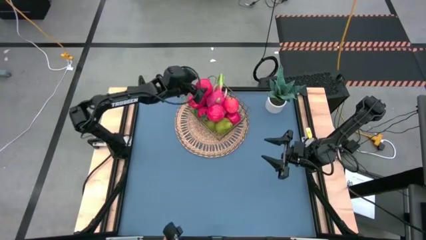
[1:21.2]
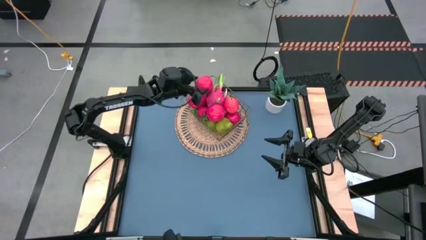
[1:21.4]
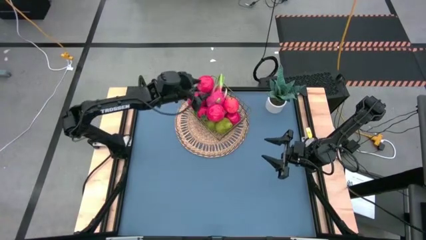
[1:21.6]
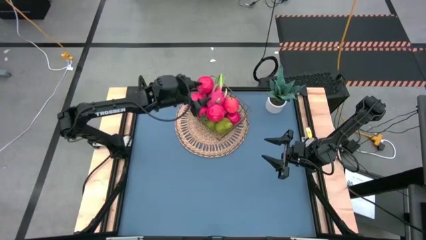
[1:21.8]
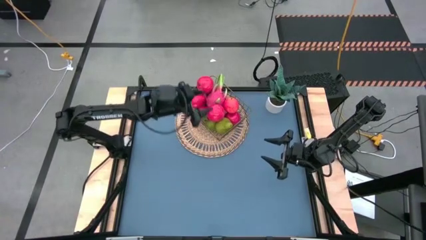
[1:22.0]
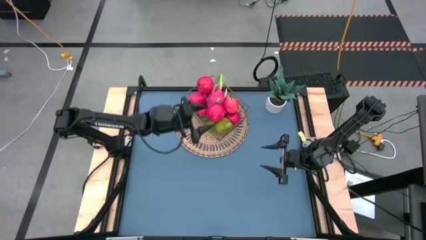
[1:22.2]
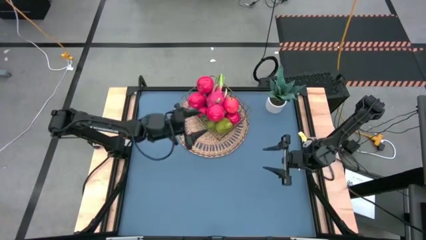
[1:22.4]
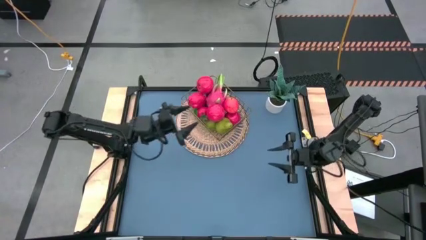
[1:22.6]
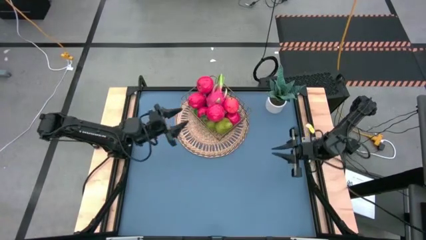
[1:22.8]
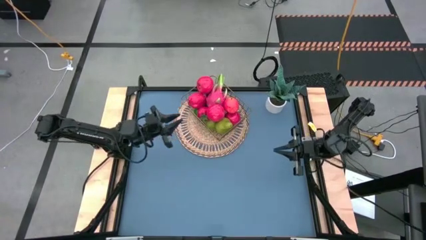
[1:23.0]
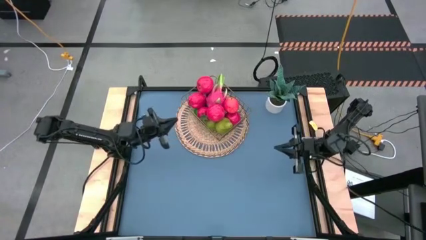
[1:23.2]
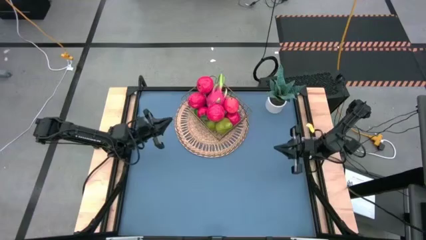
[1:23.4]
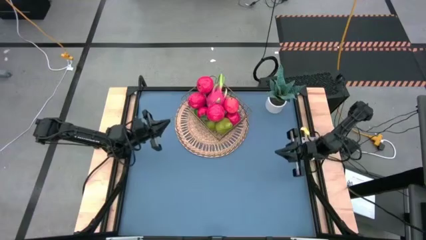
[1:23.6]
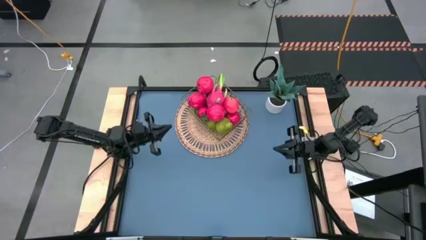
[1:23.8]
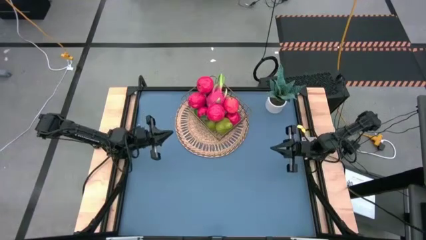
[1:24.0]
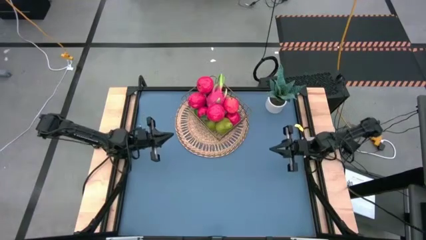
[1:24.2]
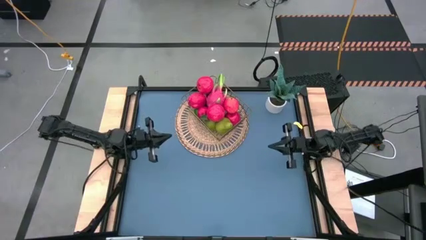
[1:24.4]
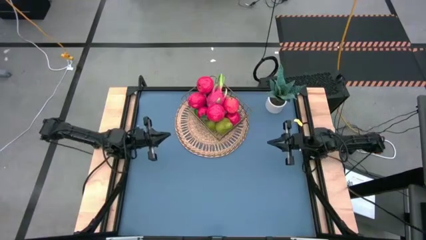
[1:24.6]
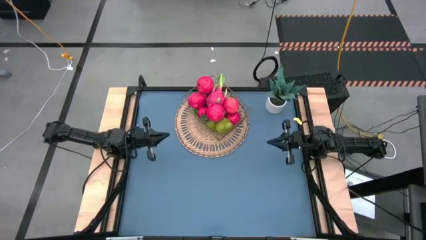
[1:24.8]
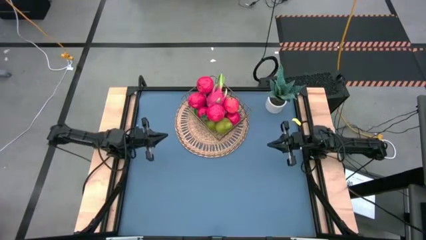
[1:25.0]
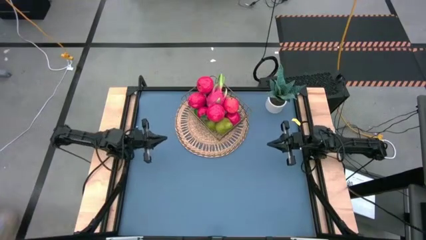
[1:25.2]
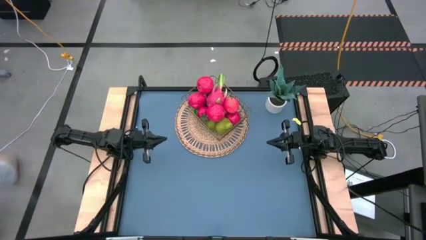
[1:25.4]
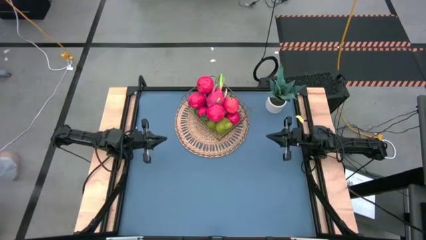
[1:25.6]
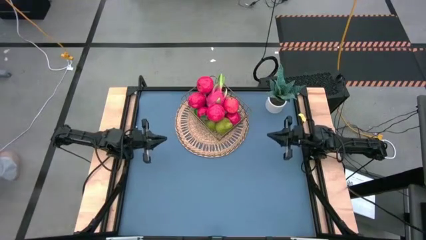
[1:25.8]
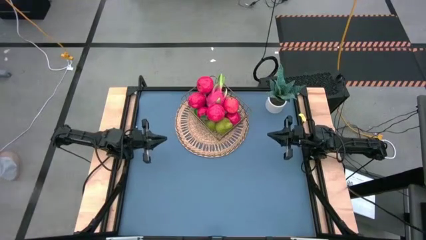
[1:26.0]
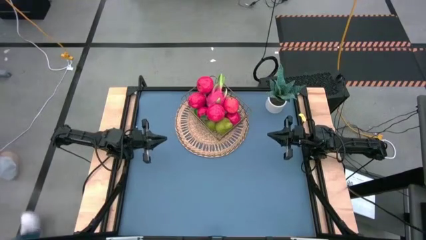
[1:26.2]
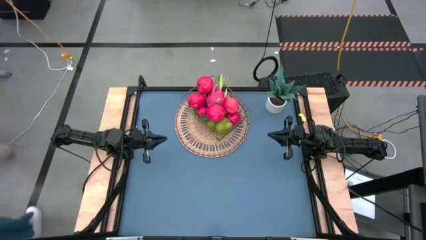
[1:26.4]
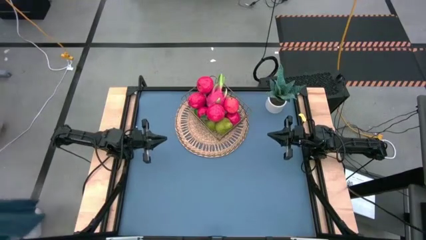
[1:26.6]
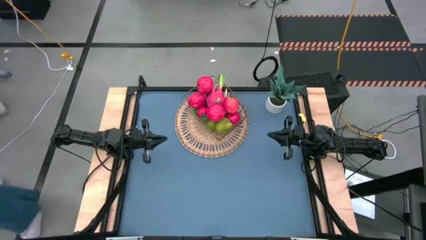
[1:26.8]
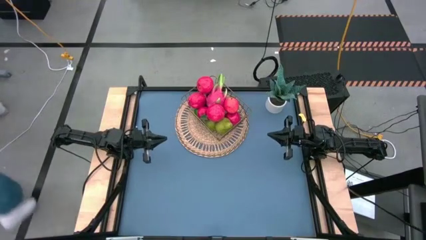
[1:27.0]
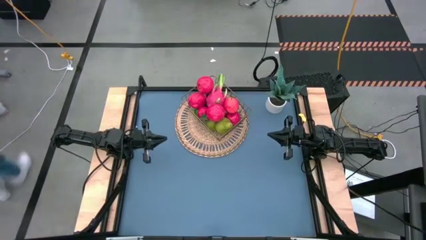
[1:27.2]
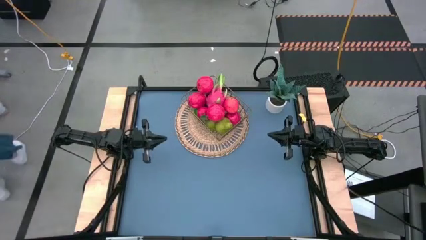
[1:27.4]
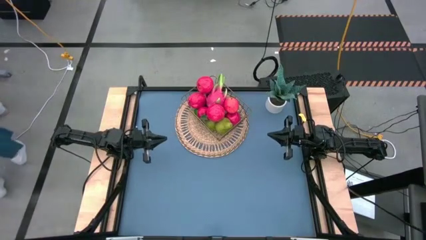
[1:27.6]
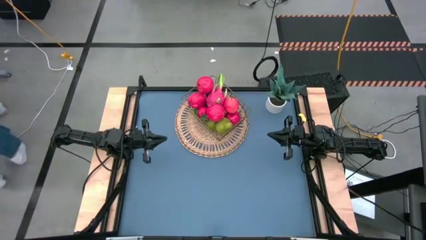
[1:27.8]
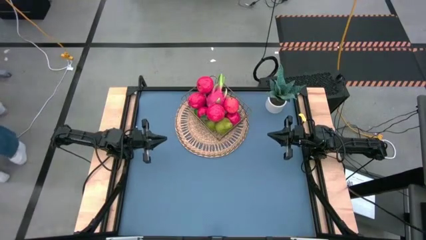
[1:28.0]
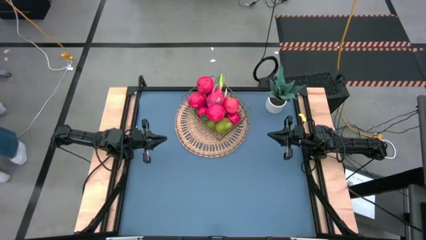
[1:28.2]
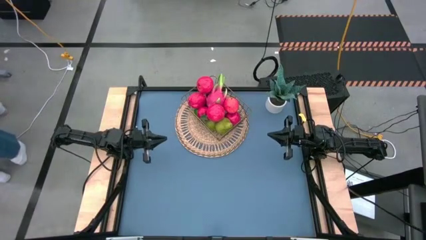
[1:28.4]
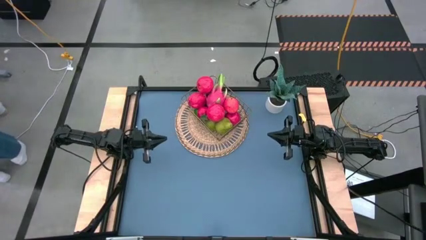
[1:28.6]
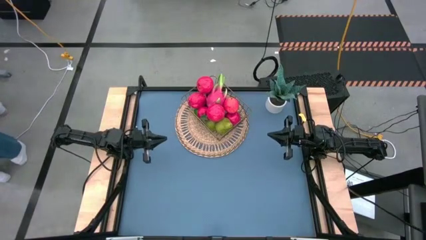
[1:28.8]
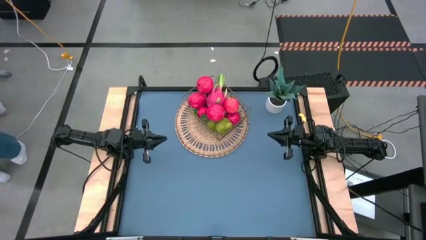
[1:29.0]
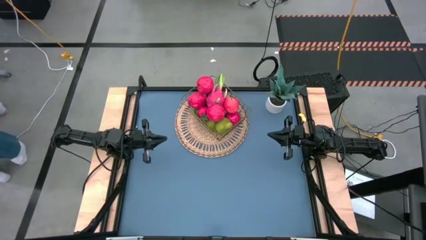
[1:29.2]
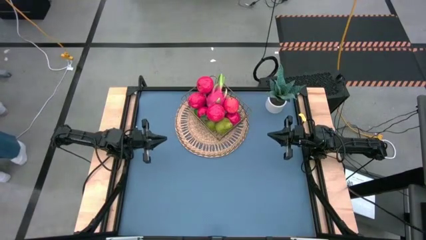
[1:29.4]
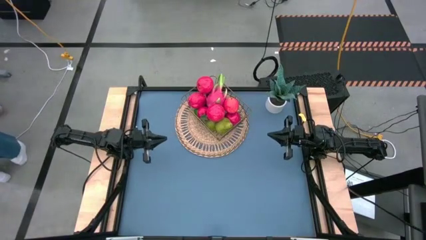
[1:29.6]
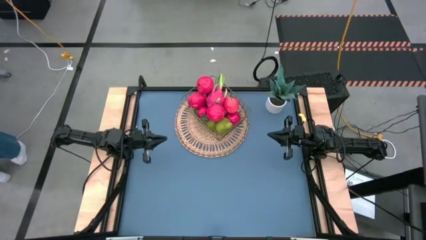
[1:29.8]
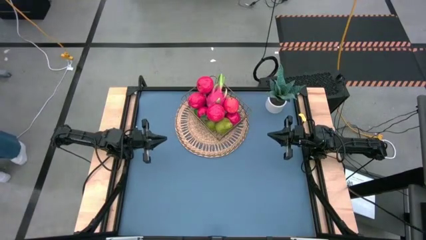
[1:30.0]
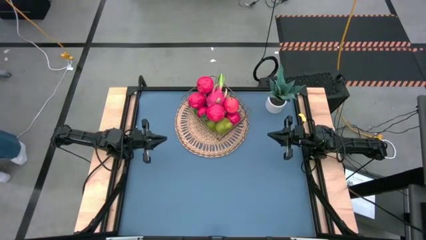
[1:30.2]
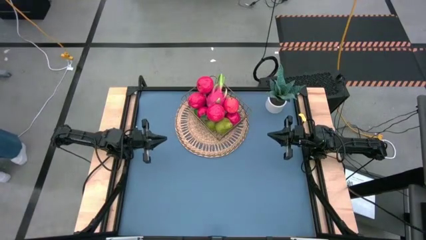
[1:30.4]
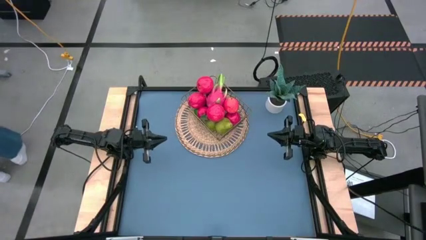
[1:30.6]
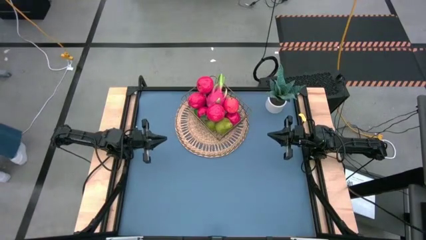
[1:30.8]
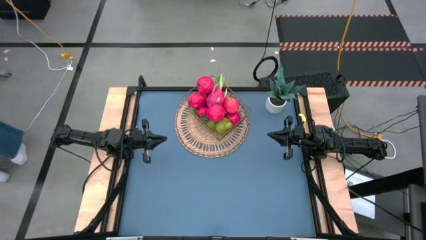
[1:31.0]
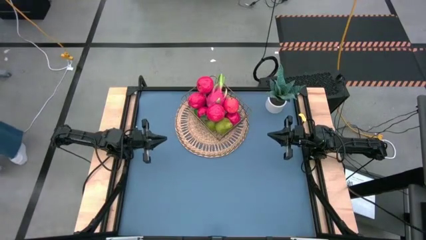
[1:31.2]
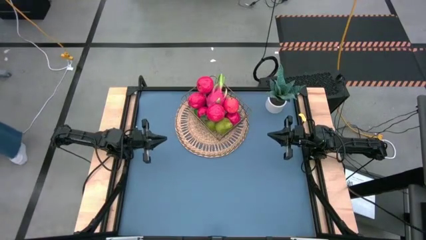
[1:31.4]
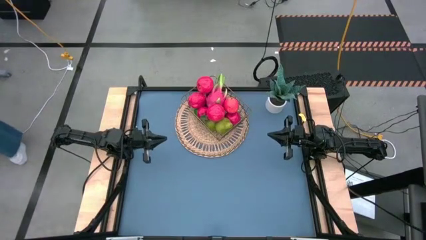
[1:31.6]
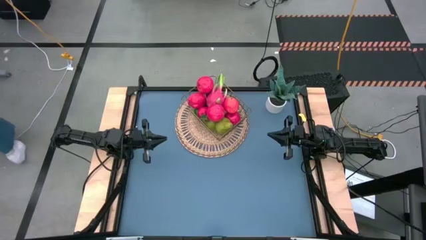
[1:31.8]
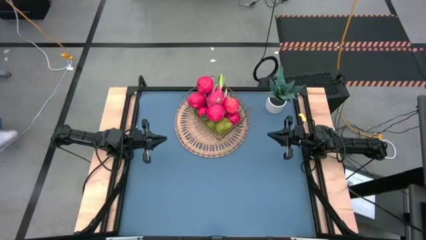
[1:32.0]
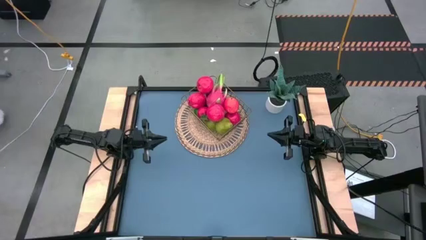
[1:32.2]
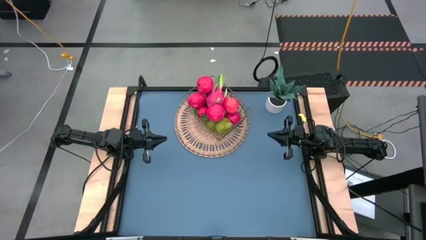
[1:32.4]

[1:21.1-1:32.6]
Task: Build produce basket
Return to Home Position

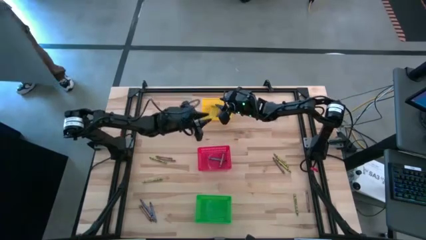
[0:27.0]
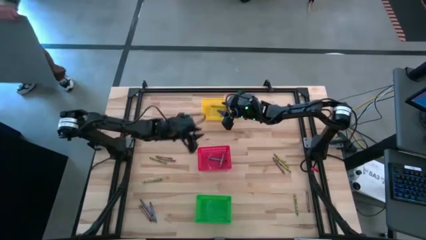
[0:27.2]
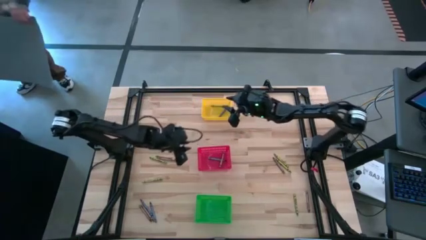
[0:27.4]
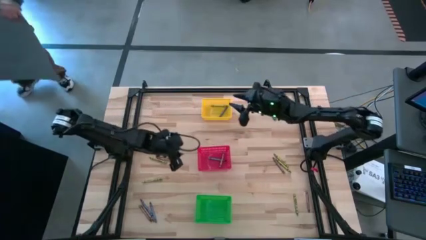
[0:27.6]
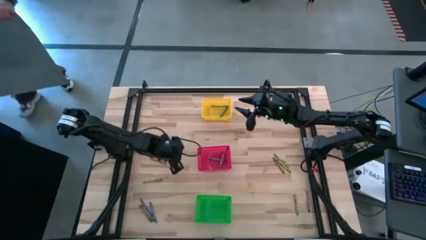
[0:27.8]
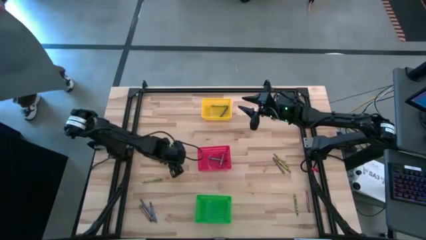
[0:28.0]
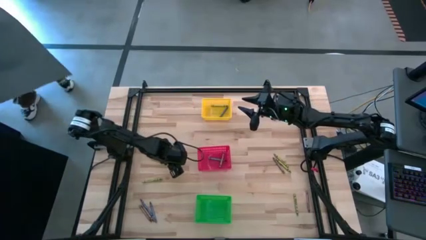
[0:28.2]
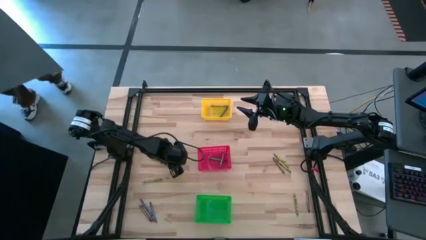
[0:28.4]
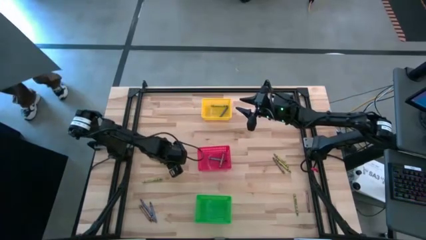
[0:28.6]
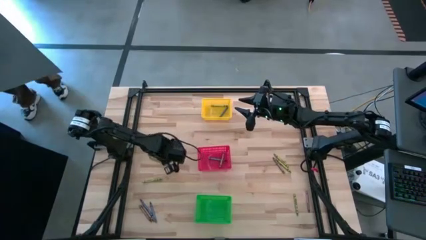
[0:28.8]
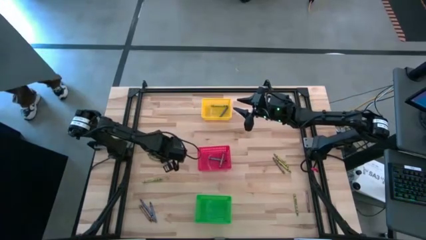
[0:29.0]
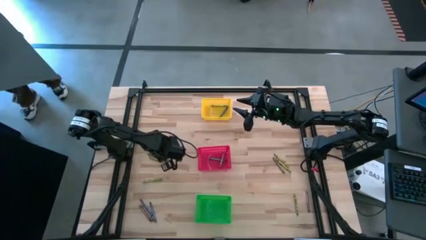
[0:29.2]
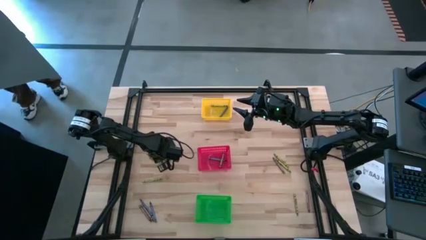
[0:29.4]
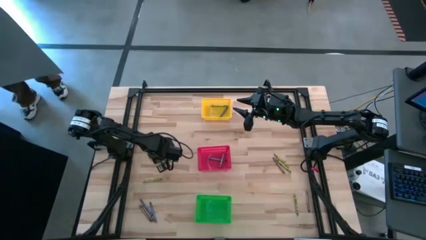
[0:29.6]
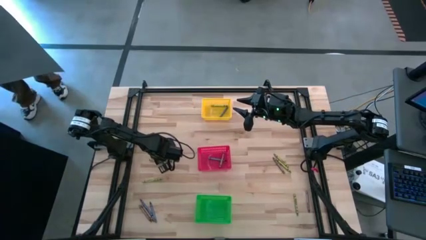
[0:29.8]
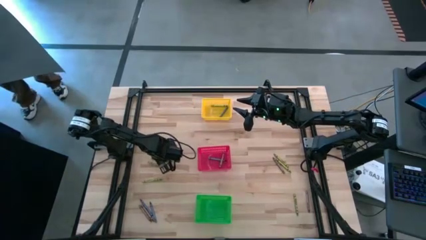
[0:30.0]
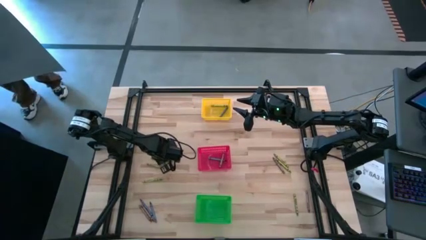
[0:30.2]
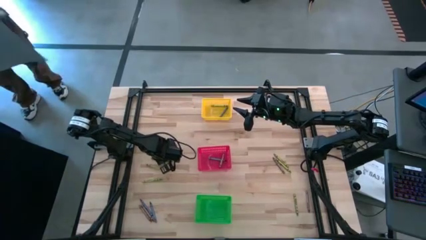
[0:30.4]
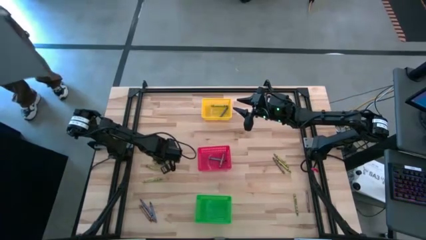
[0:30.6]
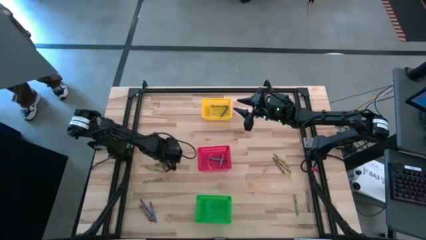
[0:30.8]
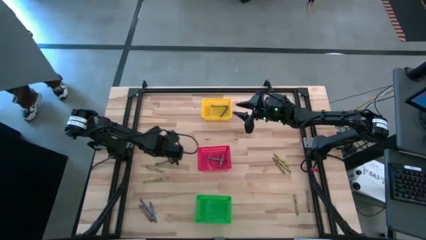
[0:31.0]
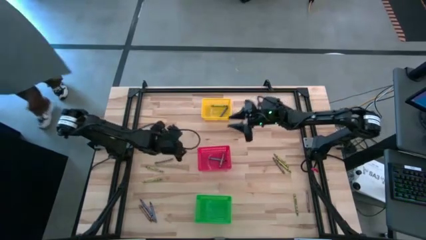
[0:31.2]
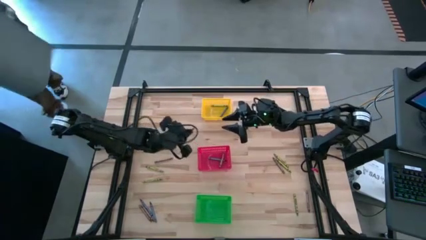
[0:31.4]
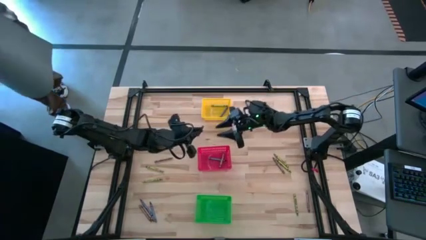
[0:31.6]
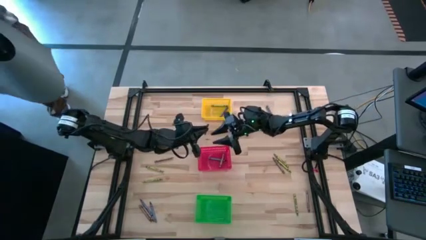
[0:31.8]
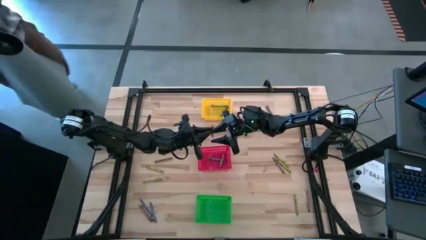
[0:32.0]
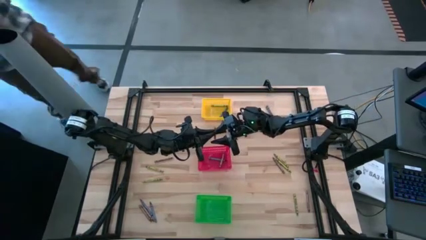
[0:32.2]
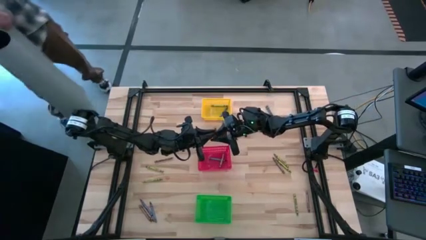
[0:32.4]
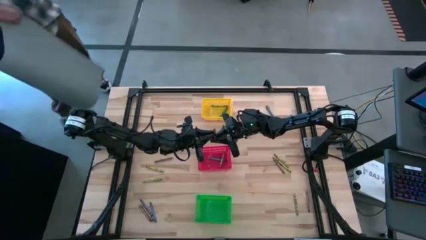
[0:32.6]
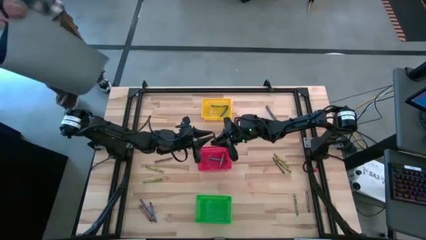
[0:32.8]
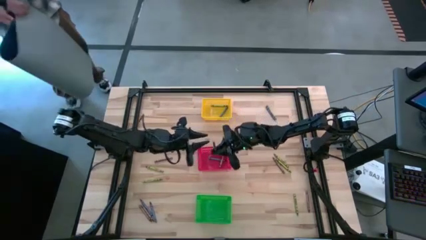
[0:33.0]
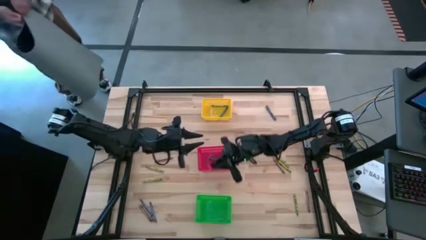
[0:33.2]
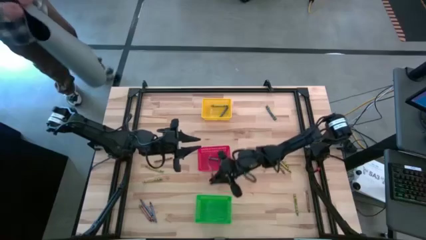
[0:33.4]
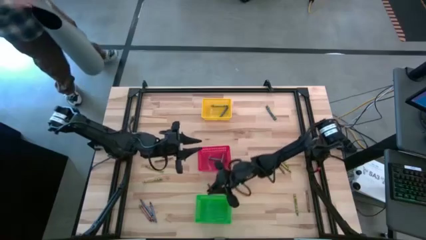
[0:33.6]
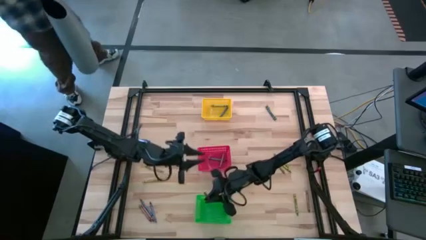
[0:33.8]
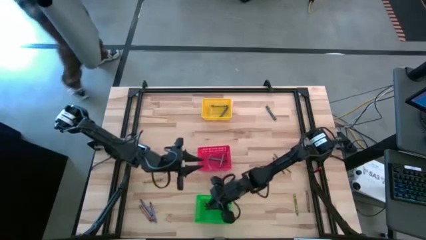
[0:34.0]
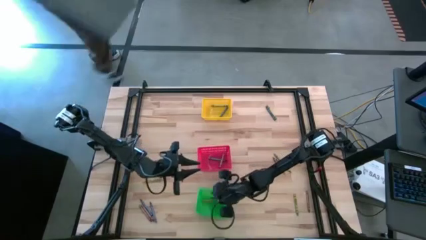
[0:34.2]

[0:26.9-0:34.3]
Task: Sort crayons
Put the brown crayon into the green bin
